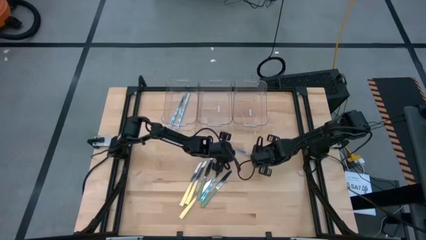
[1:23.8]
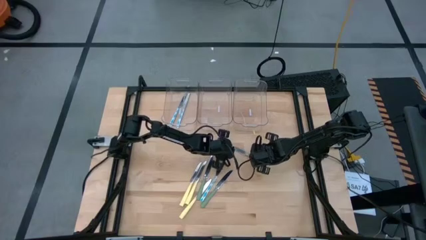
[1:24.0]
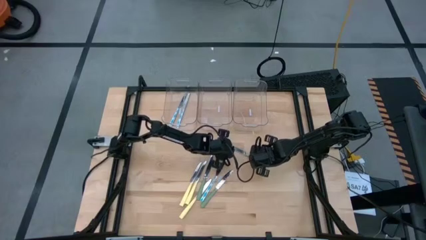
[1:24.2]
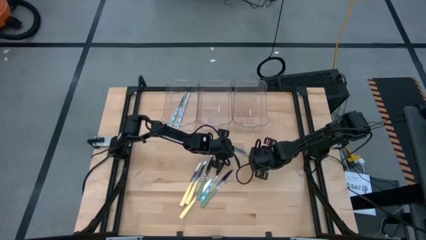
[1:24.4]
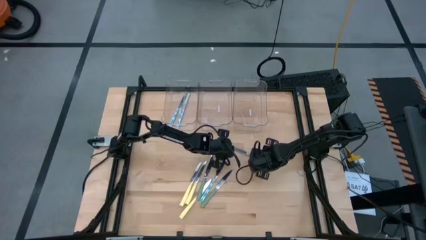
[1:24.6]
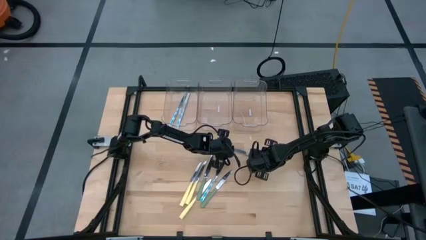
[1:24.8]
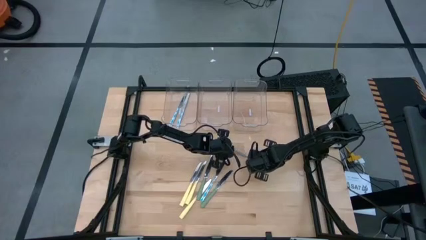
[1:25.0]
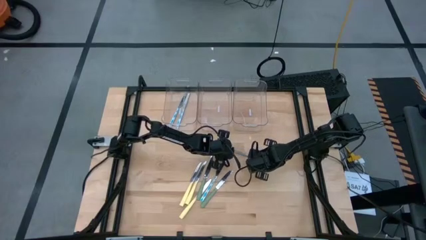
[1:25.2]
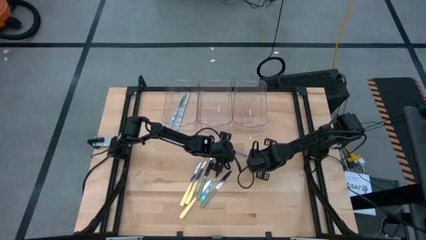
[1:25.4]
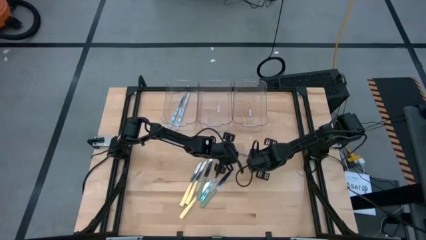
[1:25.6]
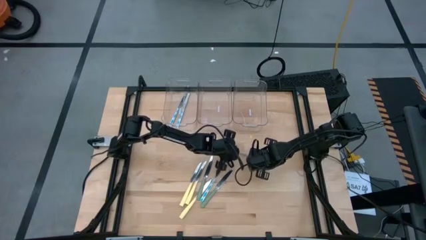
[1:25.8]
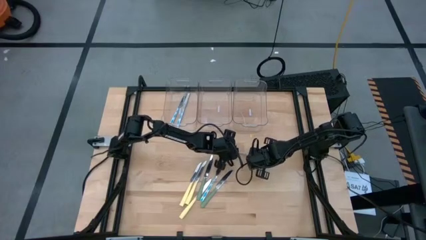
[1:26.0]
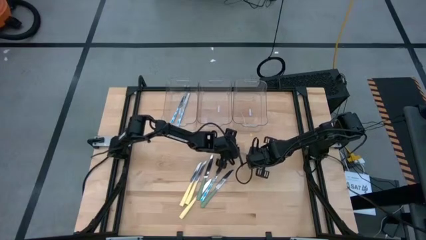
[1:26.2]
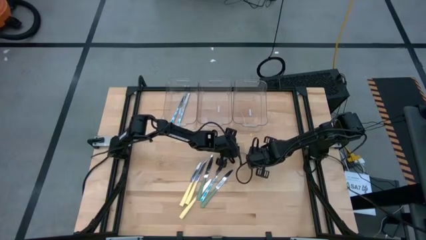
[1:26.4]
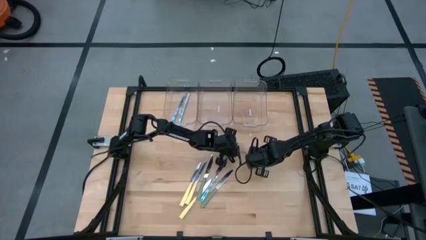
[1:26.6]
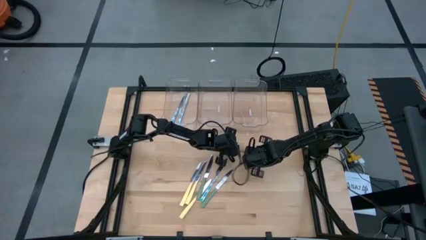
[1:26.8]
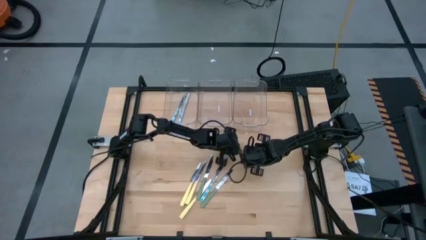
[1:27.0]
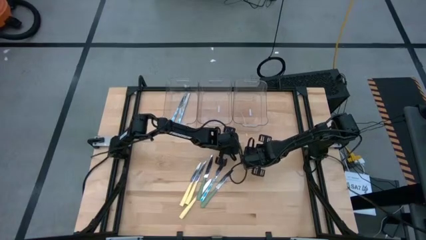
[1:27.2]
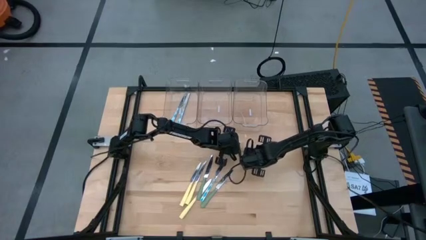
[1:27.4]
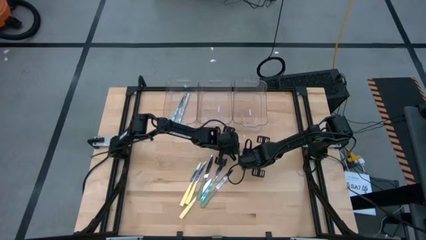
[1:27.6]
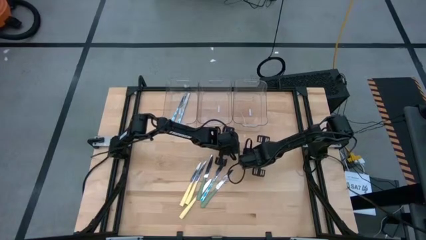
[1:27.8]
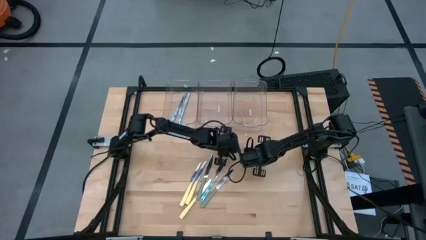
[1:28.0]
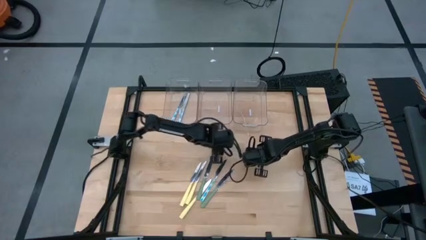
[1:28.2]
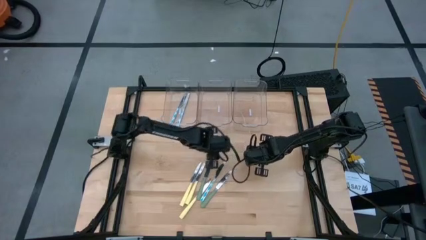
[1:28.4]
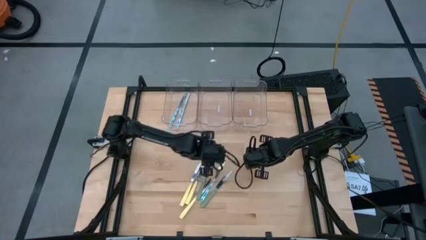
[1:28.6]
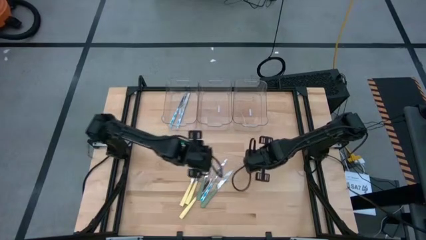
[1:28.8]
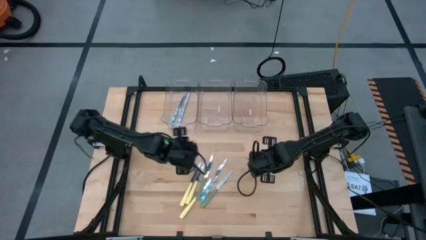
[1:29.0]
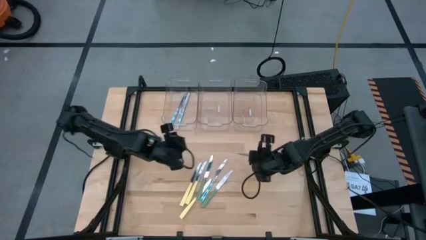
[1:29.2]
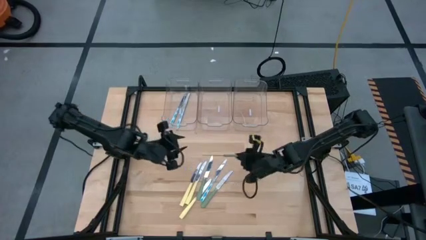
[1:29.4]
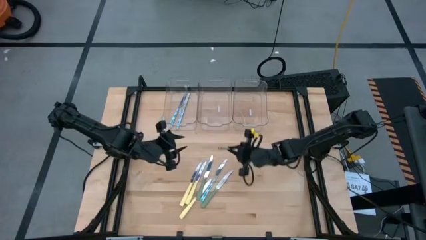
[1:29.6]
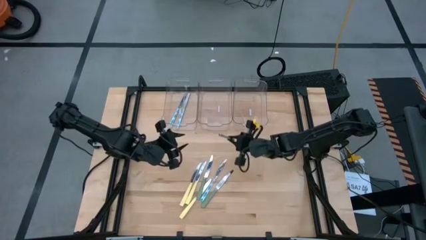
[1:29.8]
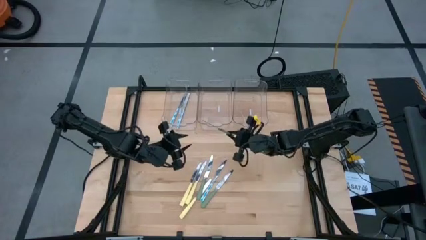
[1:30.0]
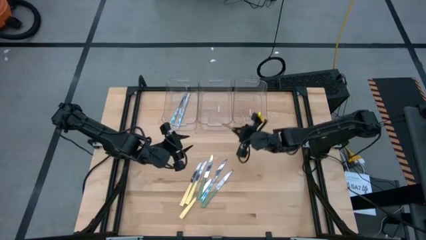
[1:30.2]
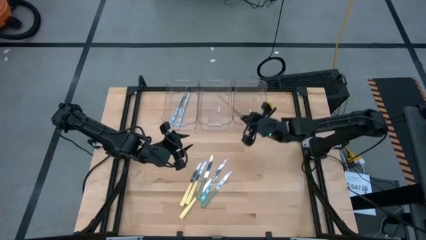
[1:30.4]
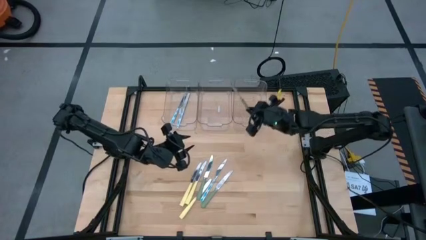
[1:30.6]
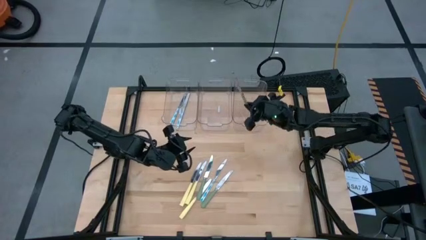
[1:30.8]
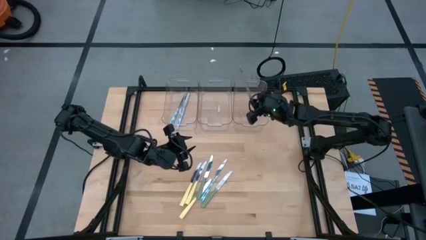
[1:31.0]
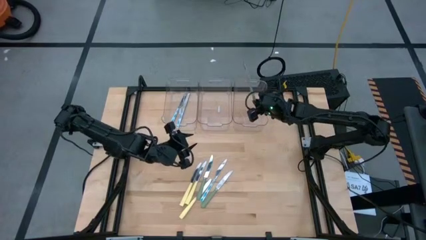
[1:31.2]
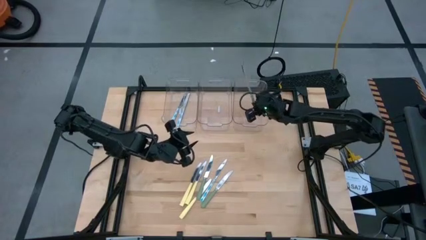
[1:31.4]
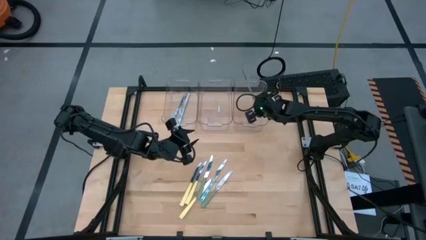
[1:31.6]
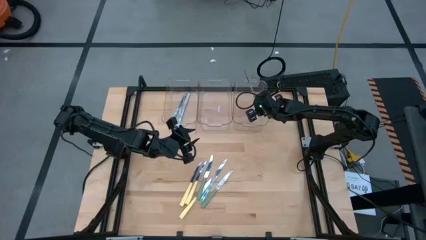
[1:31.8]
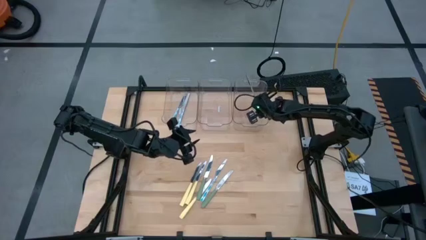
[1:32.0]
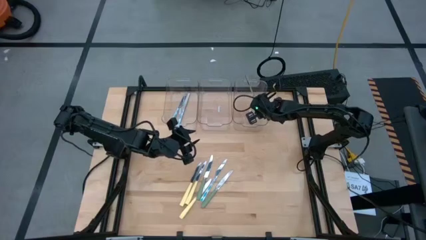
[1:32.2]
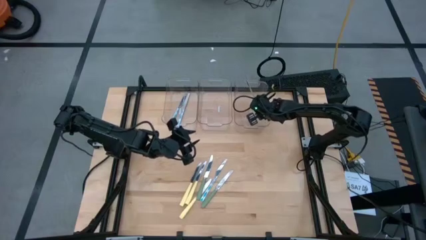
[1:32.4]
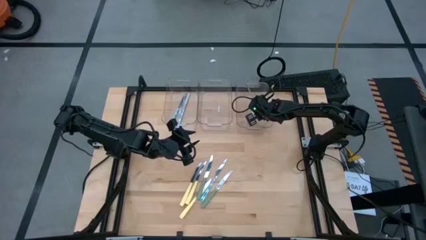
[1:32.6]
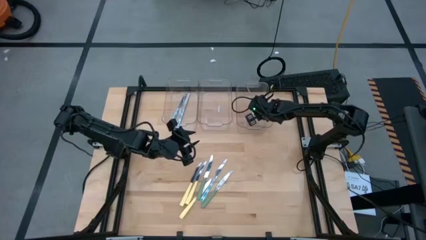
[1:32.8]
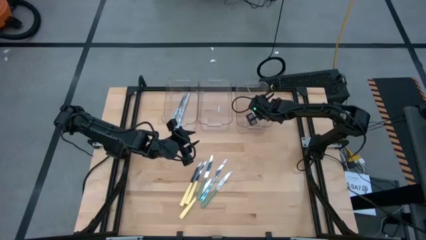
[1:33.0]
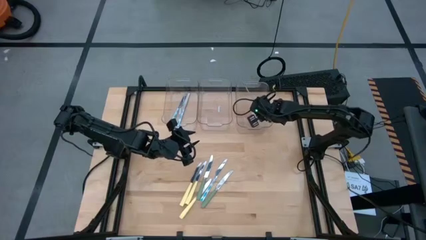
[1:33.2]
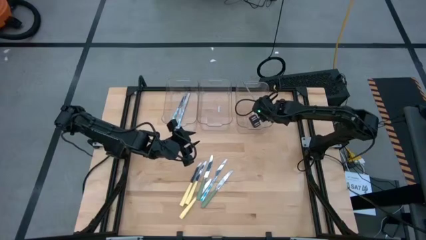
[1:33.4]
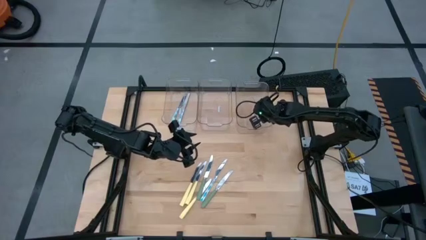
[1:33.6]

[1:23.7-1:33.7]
Task: Sort silverware by color (type)
Put the green knife into the right transparent bin

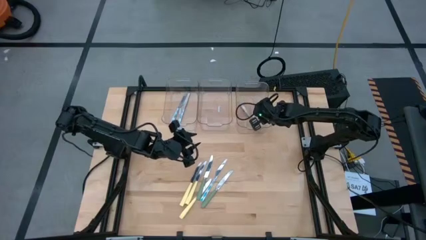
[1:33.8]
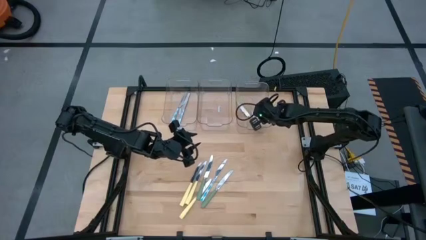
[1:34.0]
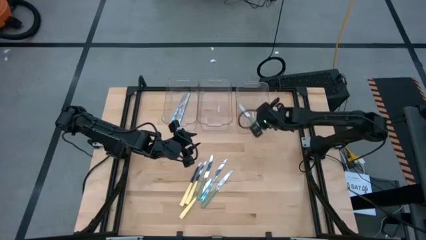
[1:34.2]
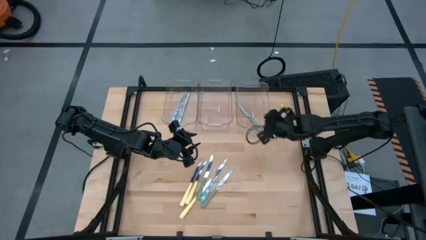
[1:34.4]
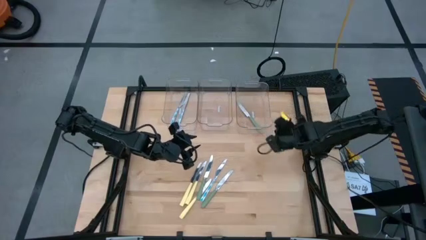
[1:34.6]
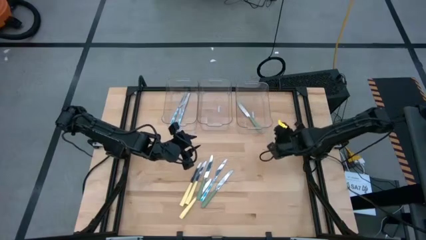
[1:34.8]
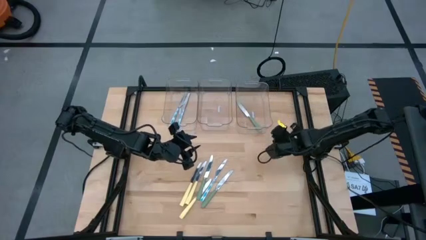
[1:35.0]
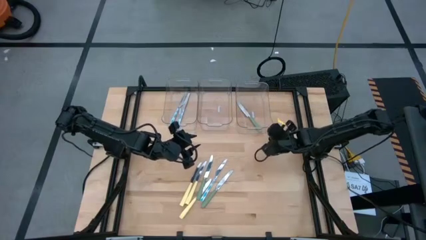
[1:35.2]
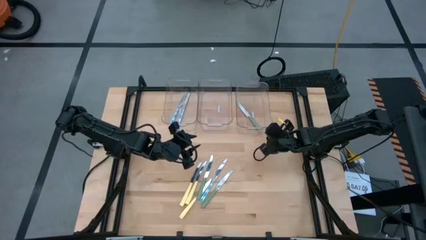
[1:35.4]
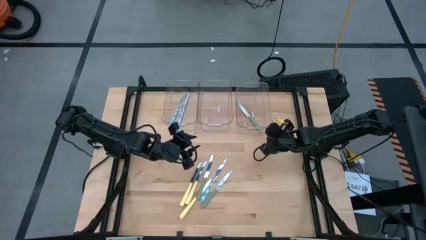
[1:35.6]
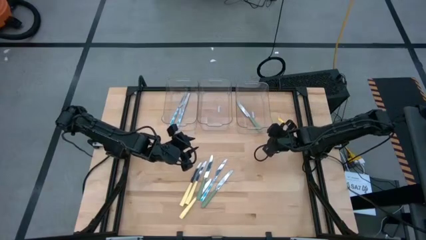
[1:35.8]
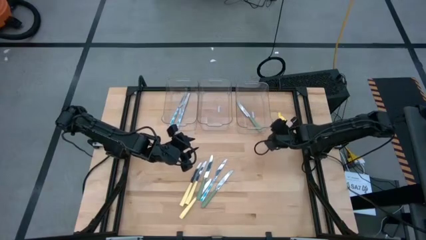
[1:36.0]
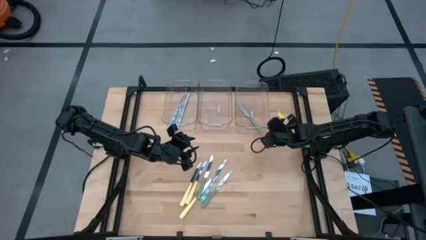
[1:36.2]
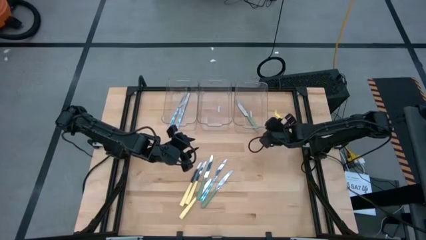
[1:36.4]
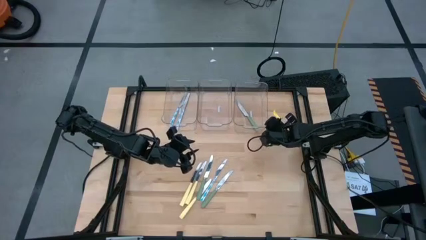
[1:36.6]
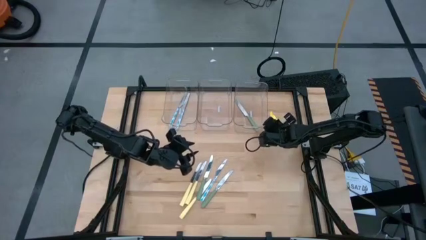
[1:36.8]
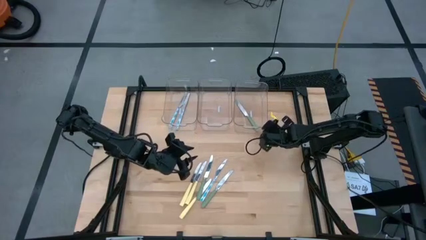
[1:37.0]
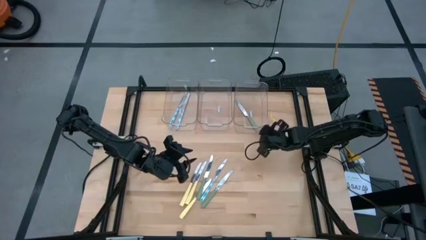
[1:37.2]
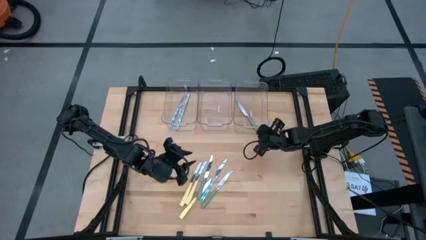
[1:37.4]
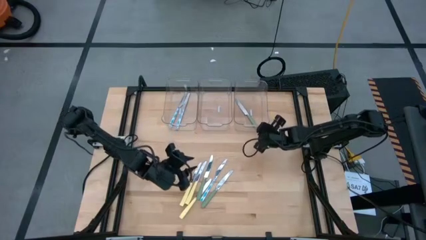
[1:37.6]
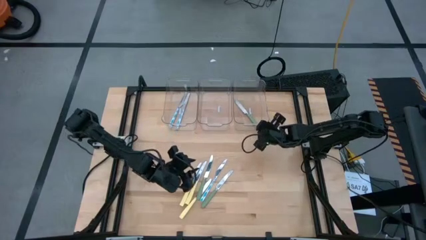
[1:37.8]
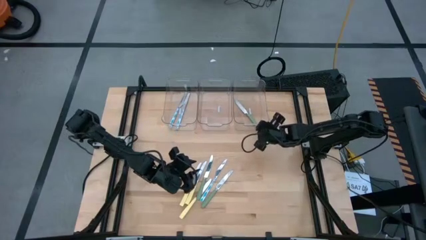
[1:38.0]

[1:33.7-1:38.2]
Adjust the right transparent bin

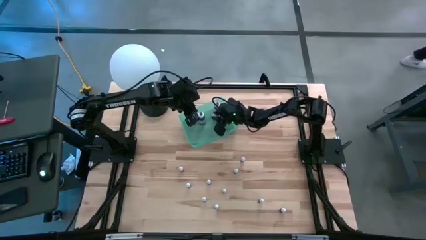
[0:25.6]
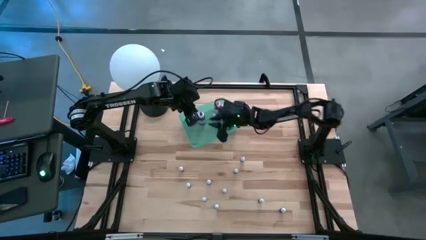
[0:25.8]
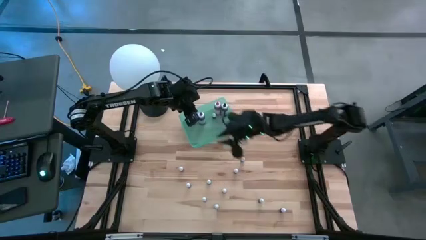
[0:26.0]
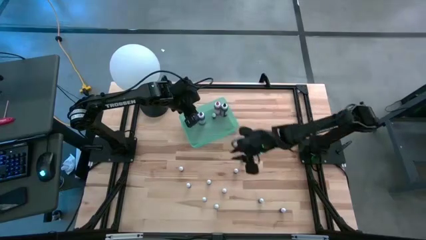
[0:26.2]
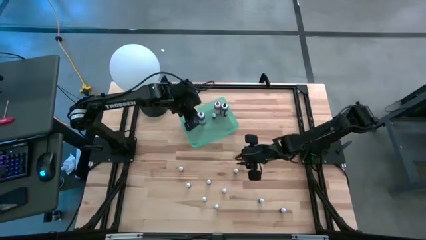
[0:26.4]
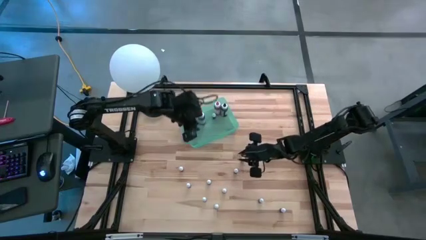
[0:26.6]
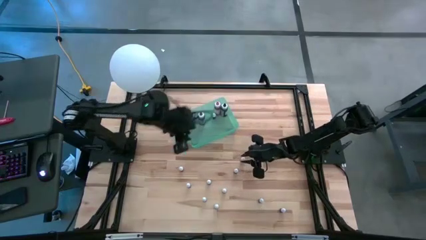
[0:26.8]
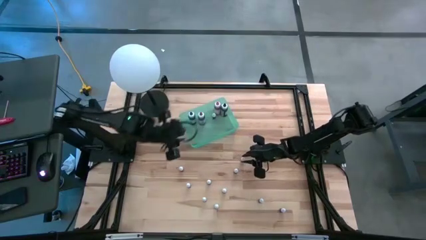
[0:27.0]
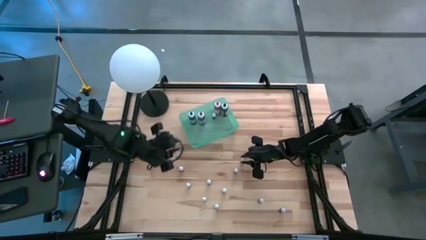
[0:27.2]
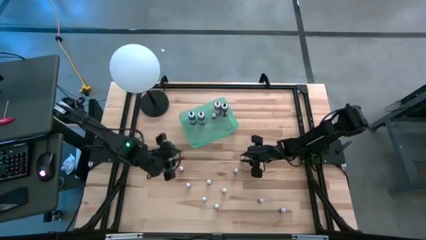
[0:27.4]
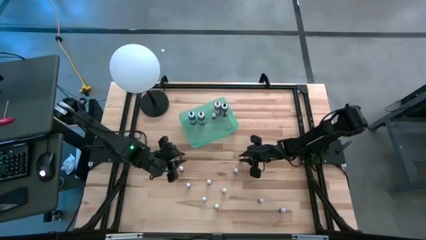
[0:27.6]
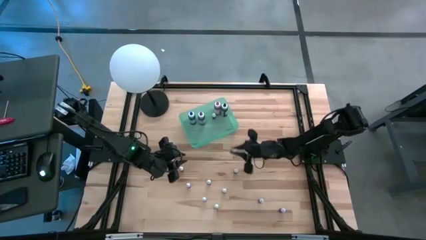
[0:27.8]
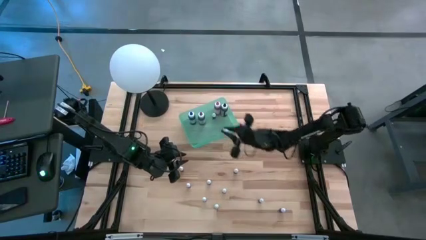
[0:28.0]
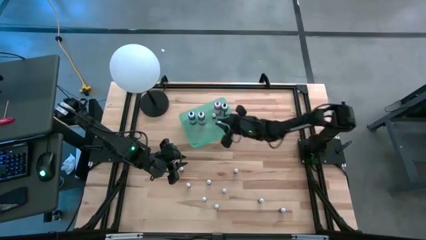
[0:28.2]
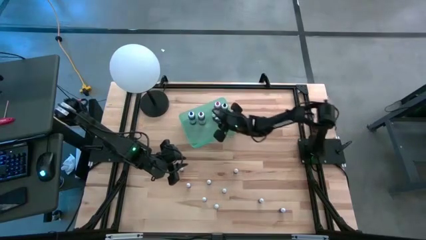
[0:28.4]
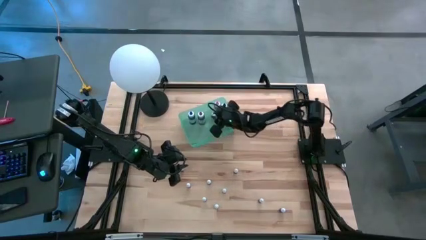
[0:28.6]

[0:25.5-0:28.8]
Task: Pick & Place food coloring
Put the top small purple bottle into the blue bin
